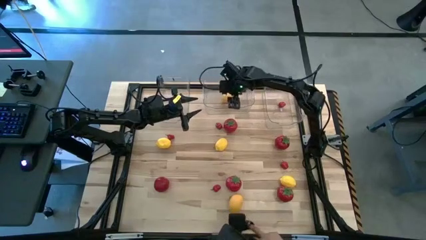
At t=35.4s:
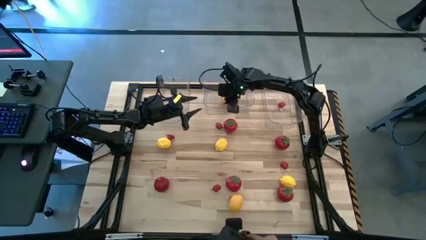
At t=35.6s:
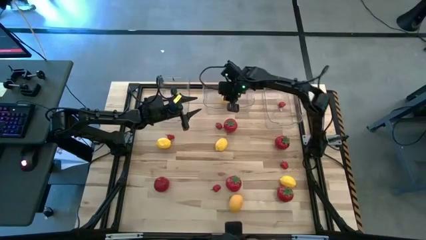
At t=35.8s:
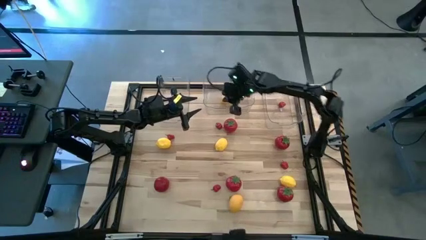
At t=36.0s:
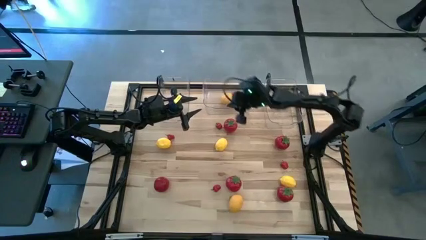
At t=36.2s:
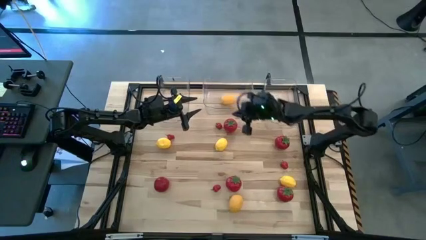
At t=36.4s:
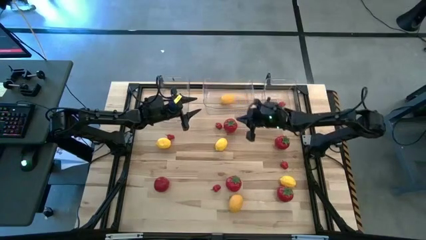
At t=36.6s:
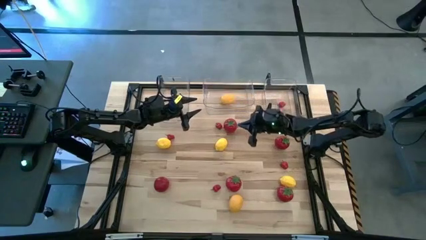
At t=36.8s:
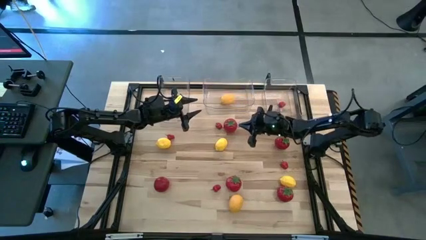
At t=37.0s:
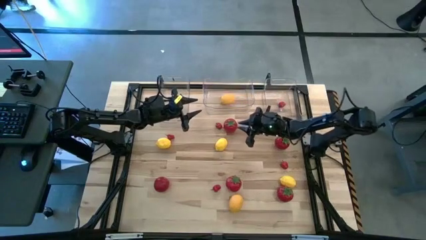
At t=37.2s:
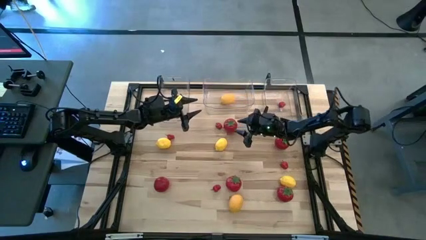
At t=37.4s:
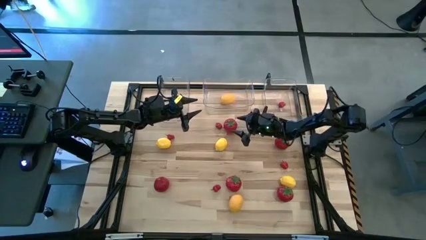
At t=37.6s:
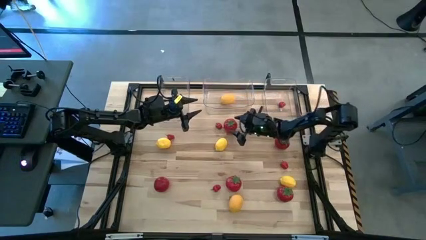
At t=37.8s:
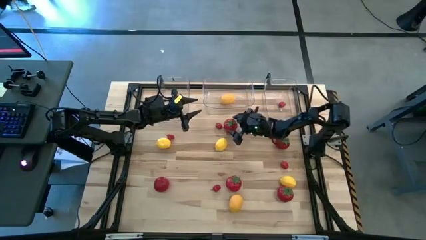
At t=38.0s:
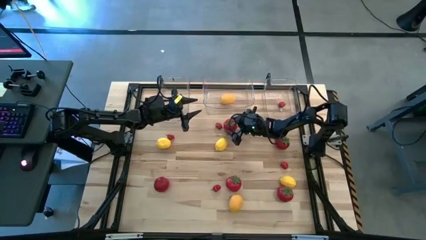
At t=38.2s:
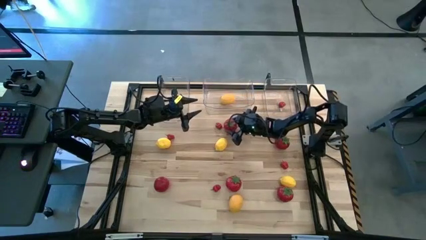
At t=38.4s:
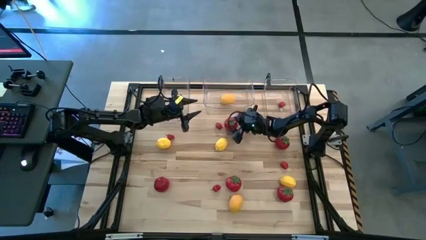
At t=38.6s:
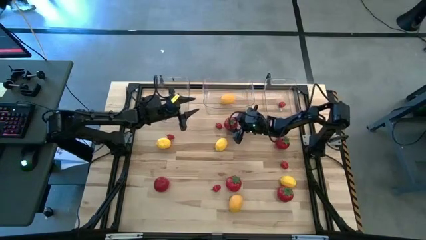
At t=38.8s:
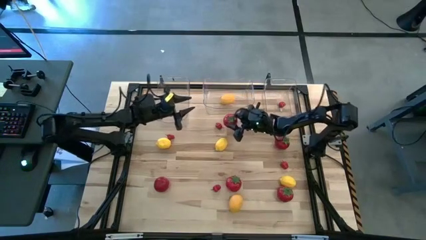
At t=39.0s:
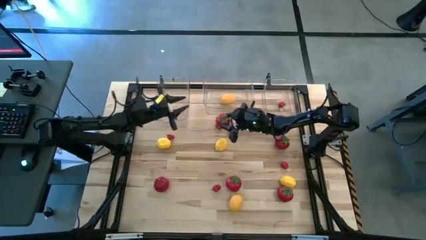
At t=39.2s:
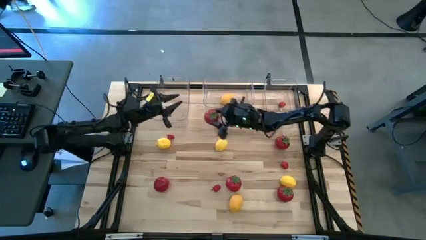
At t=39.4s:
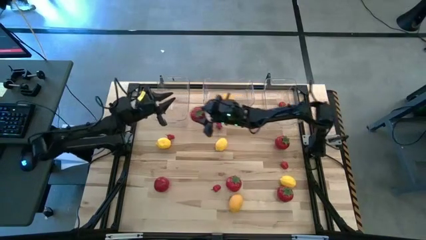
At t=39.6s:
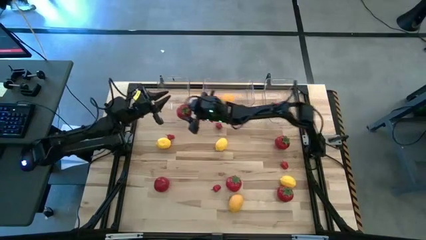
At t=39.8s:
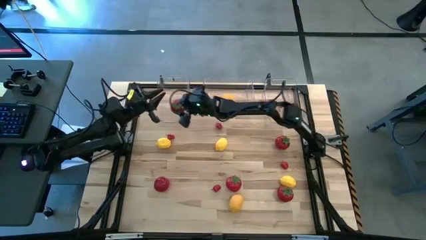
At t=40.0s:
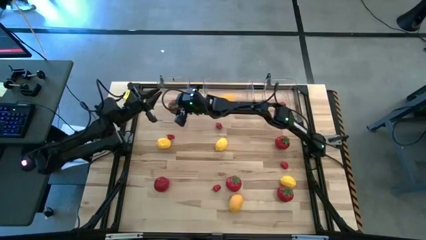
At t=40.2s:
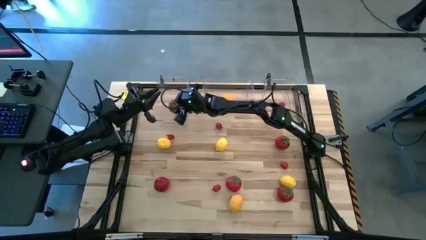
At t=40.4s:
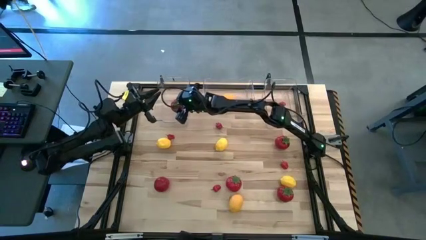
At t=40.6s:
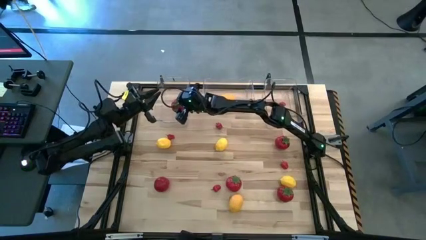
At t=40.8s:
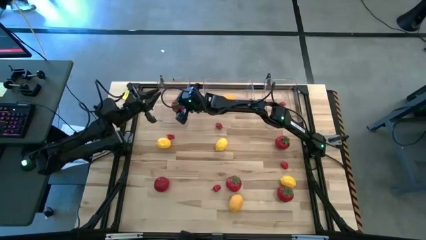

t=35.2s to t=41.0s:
Task: Sort produce into baskets
Put the red tomato into the left transparent bin

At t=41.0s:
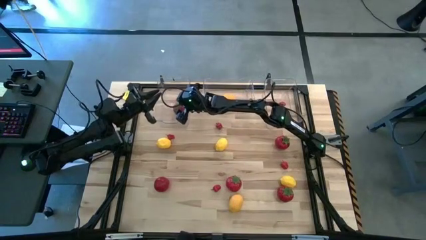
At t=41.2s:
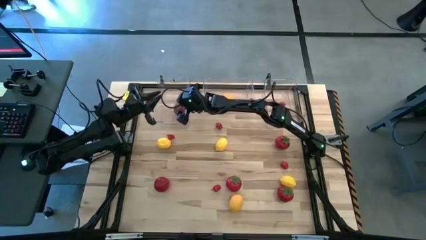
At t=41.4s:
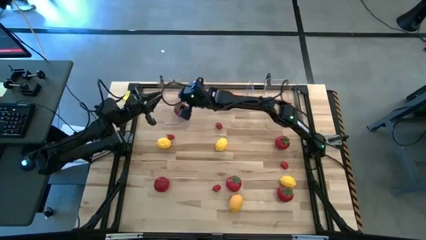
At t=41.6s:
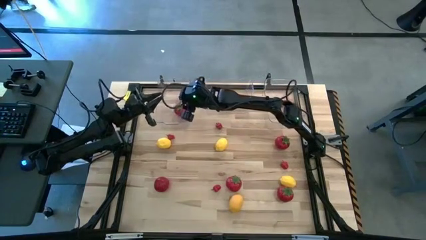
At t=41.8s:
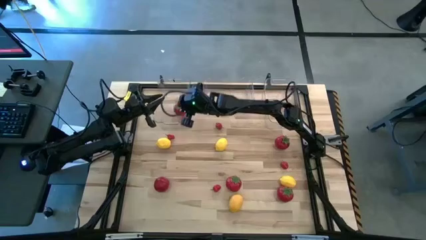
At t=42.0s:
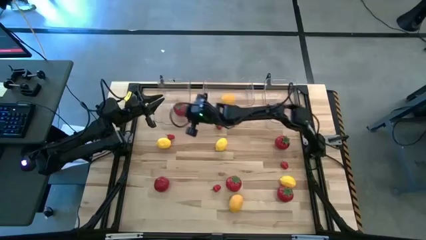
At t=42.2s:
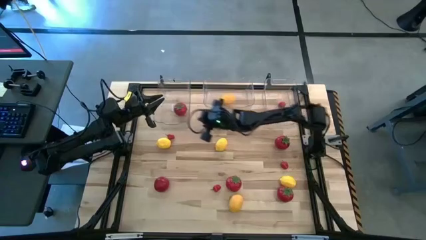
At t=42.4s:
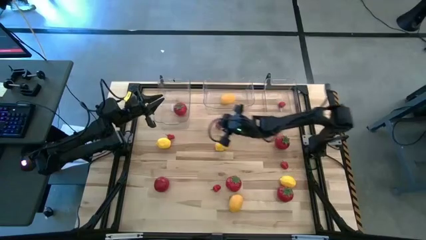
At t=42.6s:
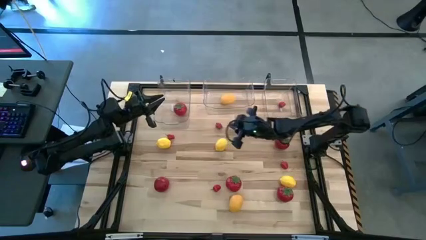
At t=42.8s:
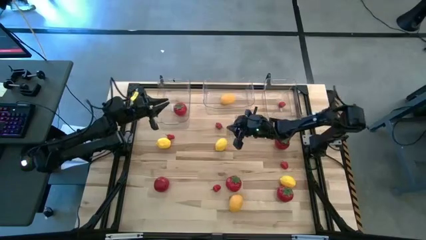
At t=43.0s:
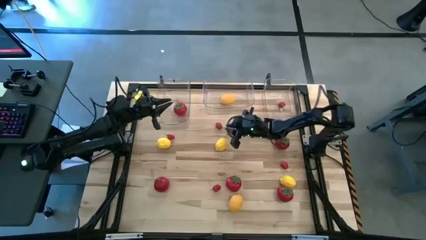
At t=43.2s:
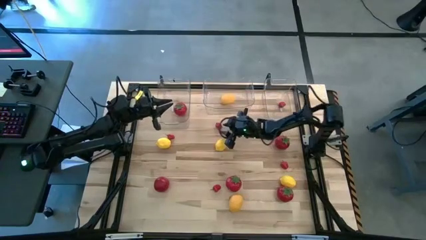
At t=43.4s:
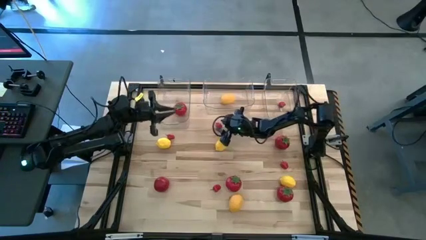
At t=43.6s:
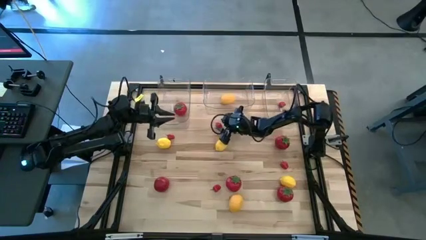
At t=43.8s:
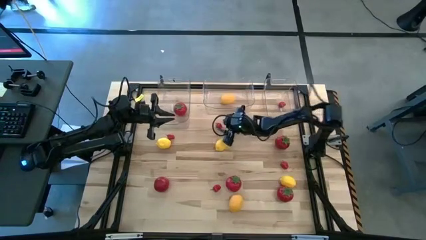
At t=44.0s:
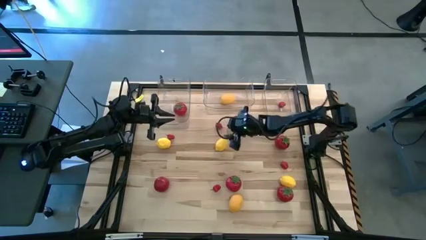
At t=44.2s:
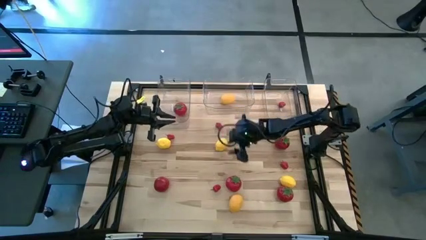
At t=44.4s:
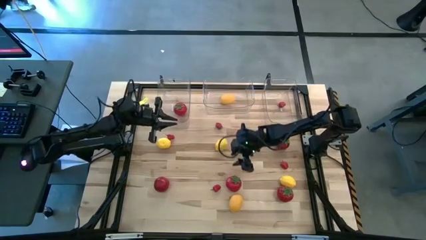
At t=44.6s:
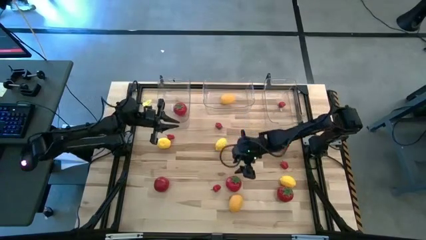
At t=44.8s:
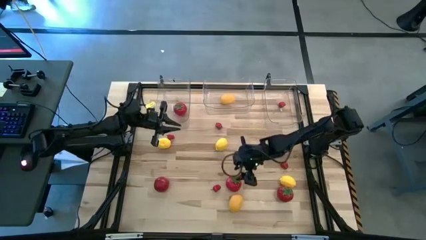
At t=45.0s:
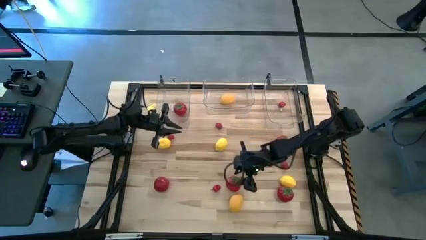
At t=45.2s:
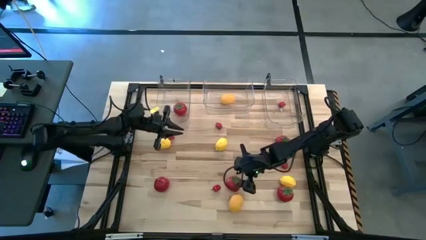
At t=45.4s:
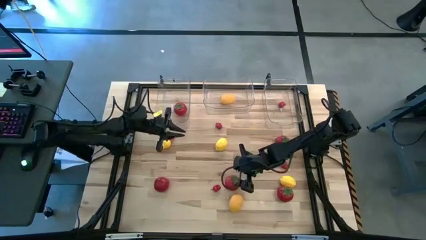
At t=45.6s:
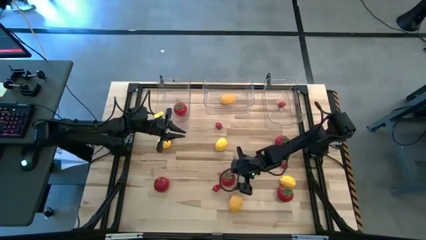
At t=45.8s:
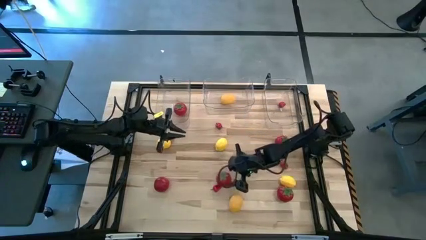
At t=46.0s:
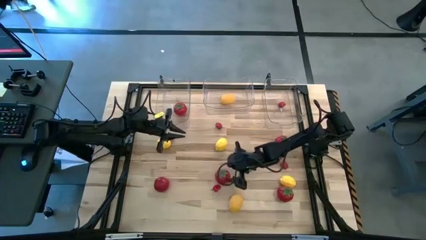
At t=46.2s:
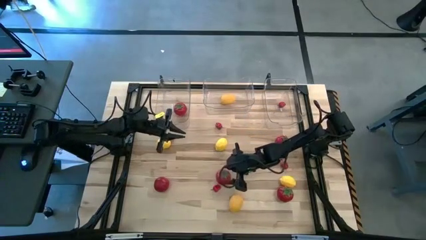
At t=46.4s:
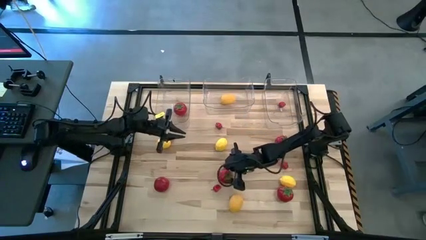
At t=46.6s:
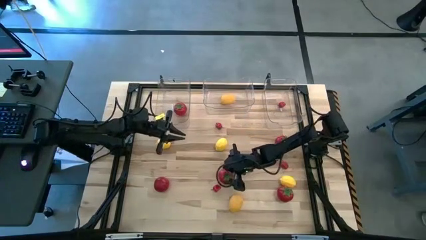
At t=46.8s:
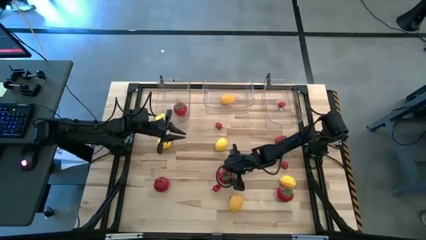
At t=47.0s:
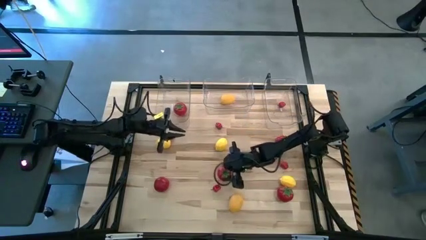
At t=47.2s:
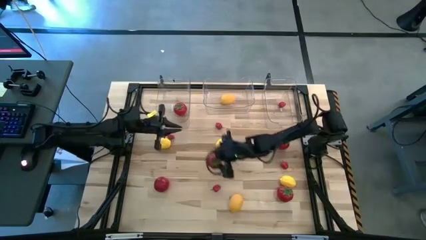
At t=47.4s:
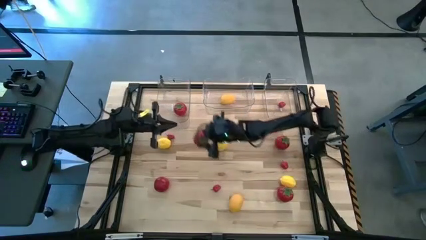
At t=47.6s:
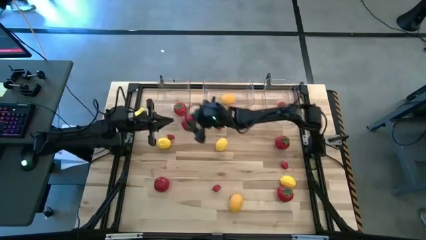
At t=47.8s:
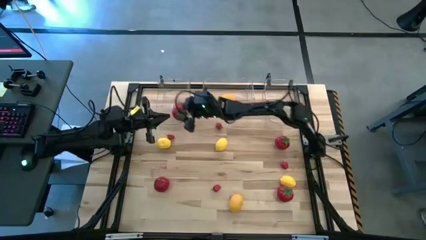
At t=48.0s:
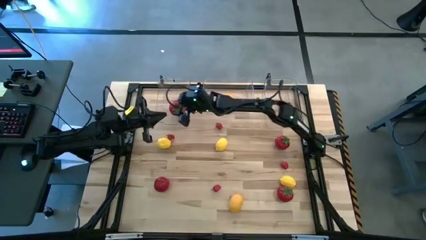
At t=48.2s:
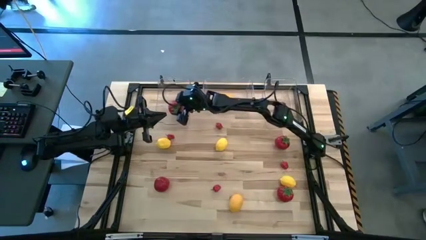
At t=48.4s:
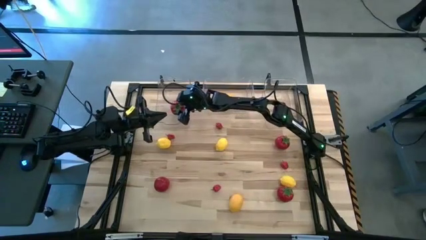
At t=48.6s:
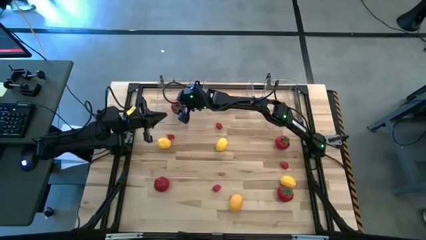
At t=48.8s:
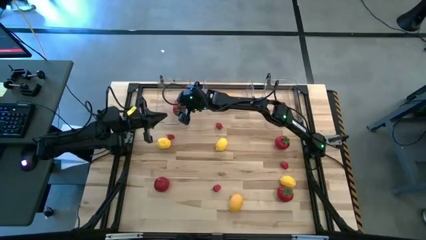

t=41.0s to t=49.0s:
Put the red tomato into the left transparent bin
